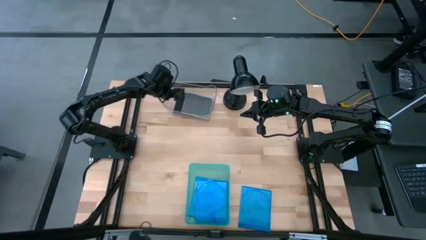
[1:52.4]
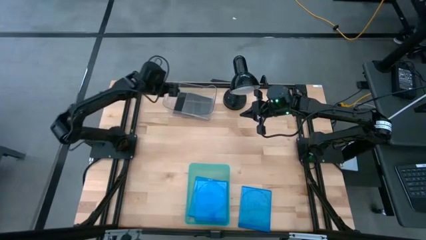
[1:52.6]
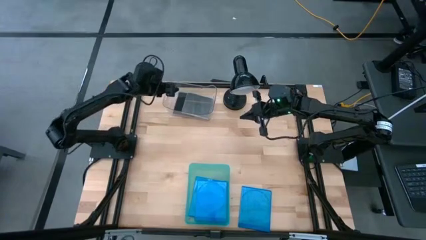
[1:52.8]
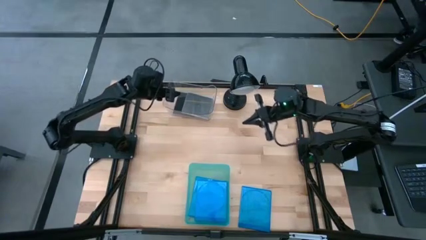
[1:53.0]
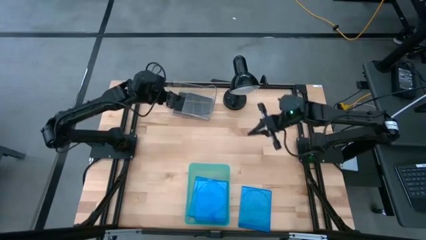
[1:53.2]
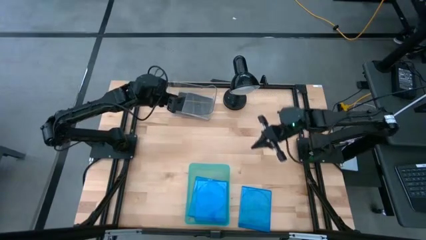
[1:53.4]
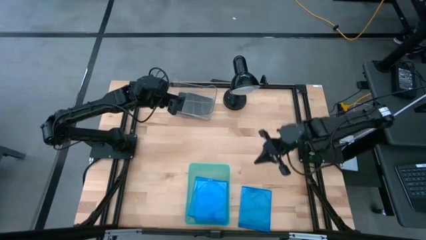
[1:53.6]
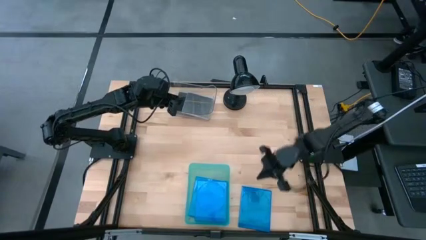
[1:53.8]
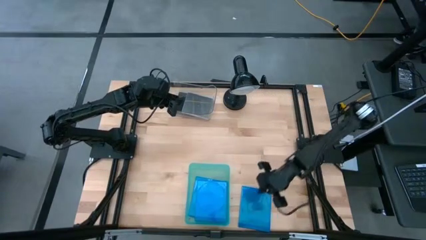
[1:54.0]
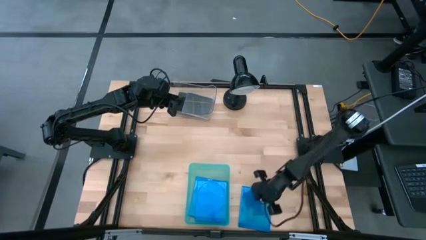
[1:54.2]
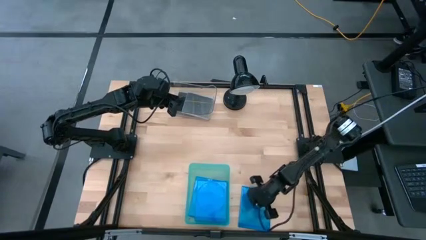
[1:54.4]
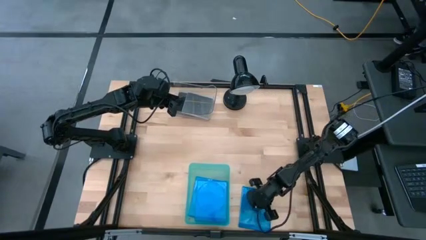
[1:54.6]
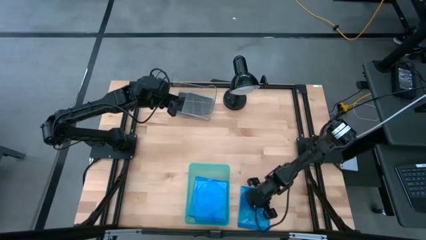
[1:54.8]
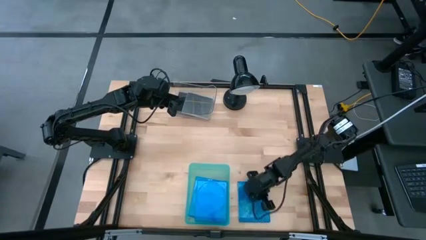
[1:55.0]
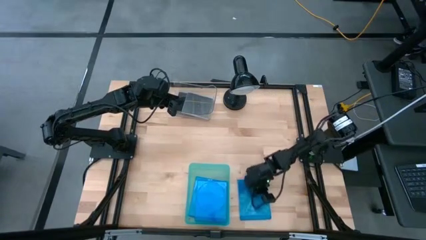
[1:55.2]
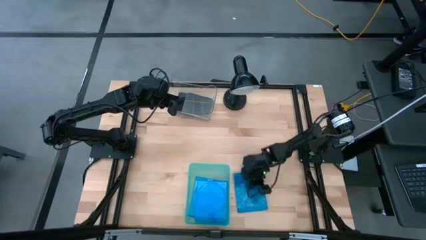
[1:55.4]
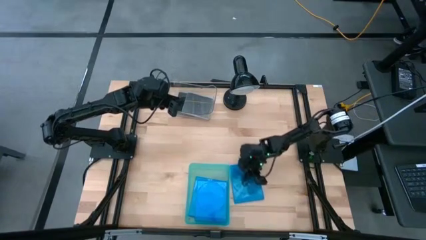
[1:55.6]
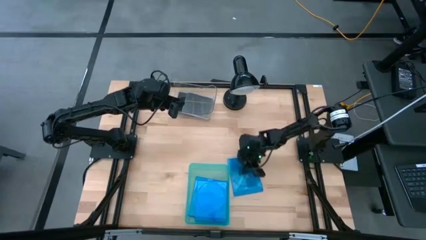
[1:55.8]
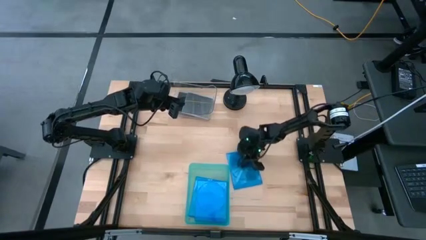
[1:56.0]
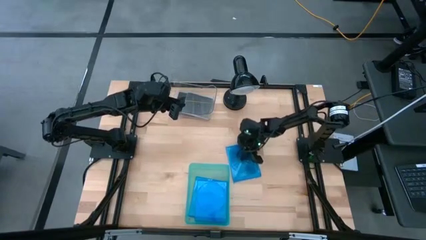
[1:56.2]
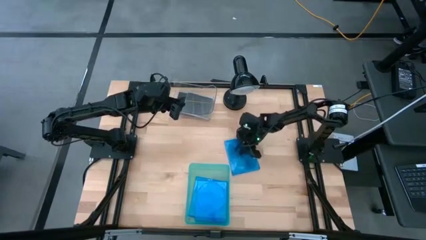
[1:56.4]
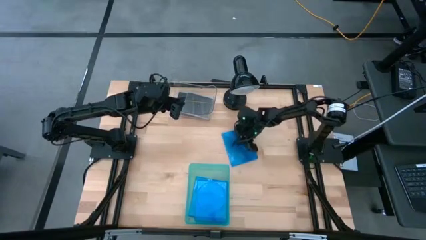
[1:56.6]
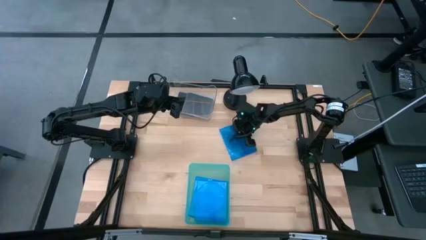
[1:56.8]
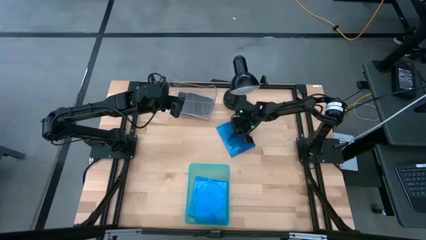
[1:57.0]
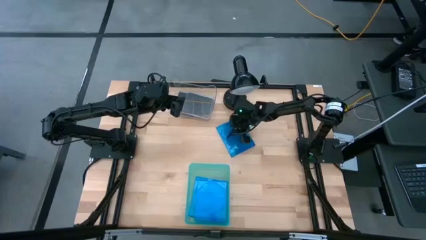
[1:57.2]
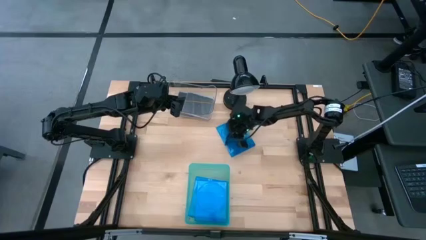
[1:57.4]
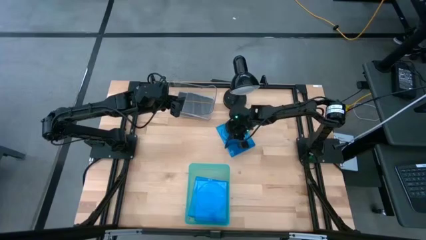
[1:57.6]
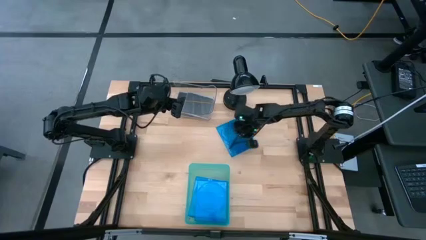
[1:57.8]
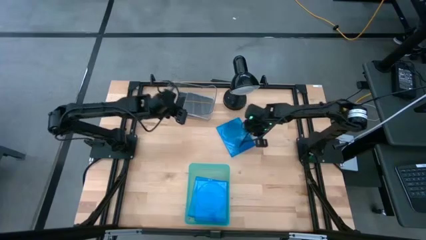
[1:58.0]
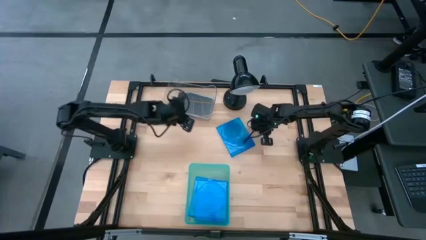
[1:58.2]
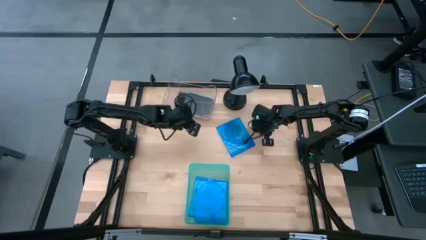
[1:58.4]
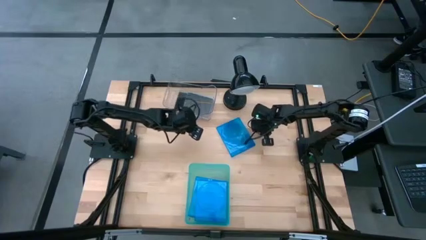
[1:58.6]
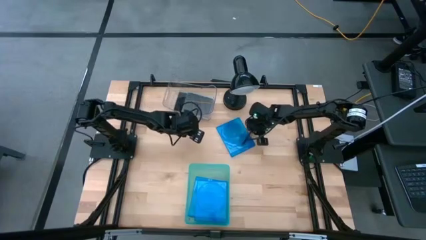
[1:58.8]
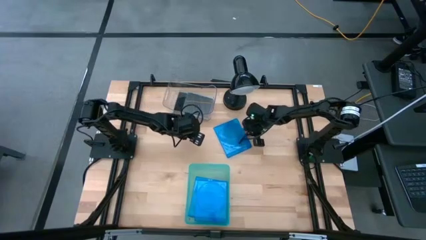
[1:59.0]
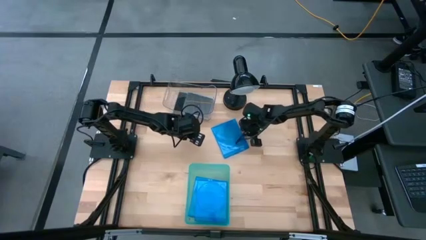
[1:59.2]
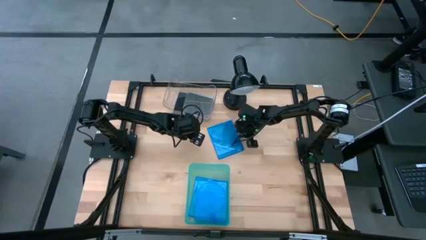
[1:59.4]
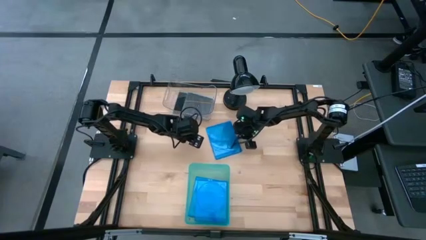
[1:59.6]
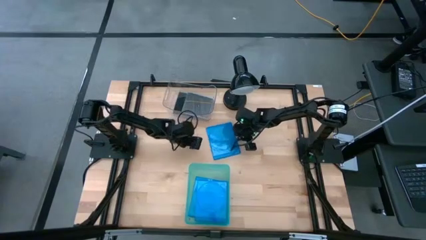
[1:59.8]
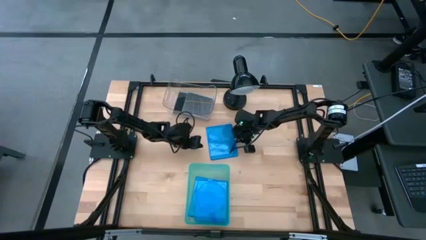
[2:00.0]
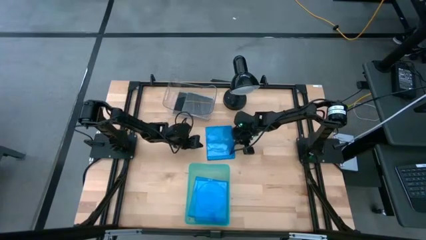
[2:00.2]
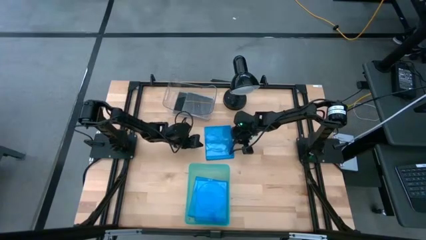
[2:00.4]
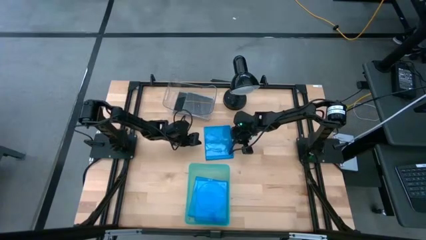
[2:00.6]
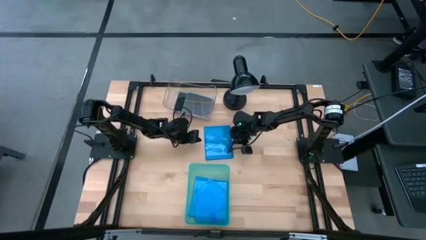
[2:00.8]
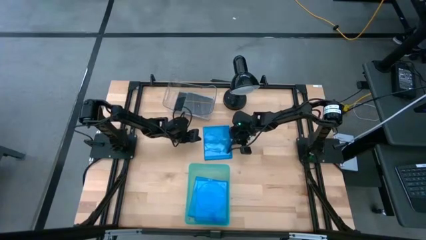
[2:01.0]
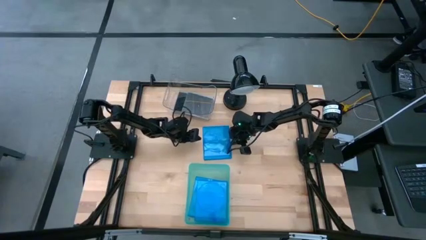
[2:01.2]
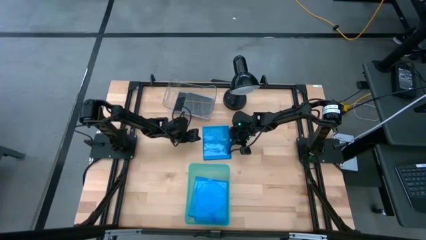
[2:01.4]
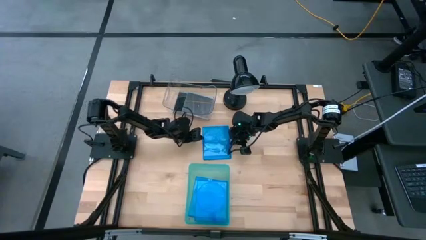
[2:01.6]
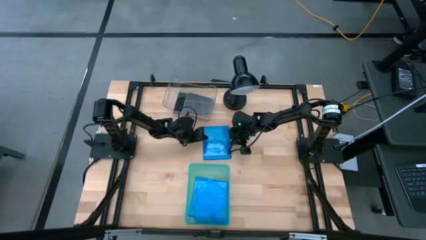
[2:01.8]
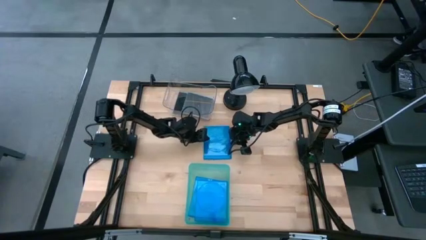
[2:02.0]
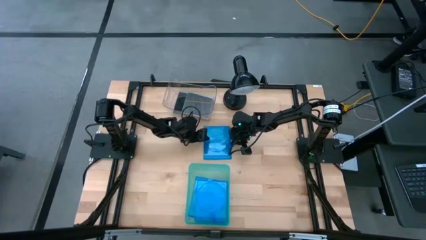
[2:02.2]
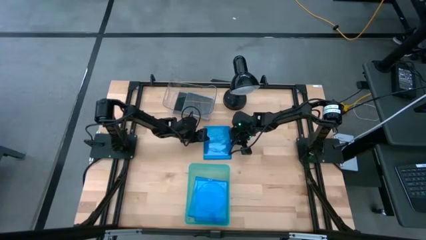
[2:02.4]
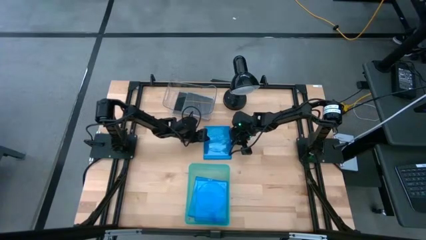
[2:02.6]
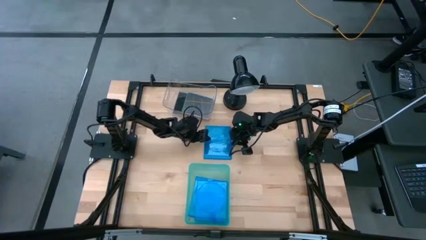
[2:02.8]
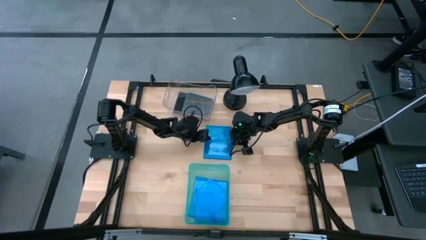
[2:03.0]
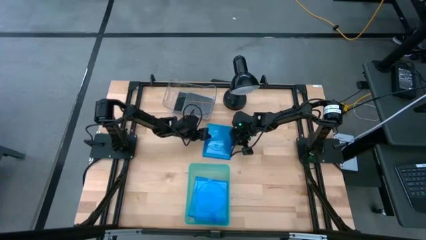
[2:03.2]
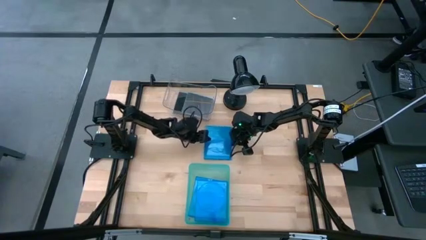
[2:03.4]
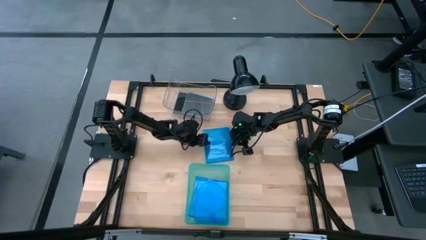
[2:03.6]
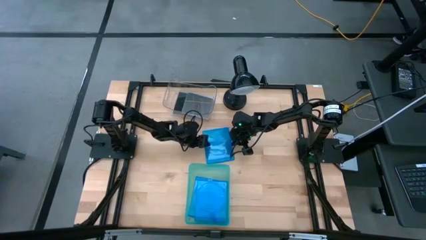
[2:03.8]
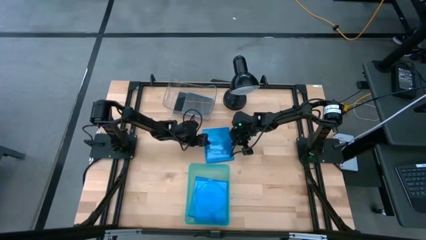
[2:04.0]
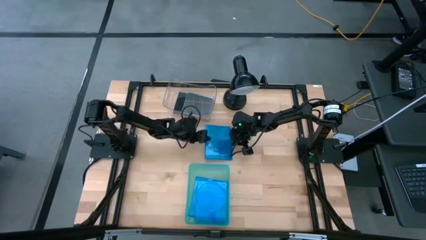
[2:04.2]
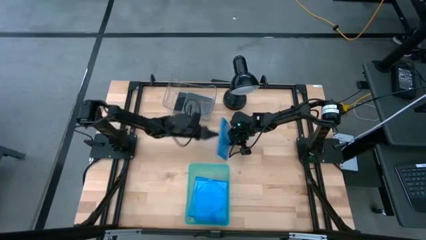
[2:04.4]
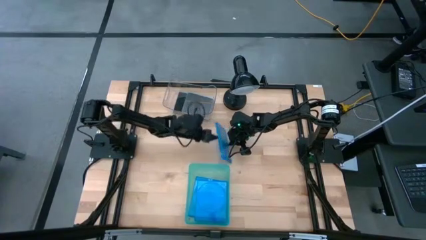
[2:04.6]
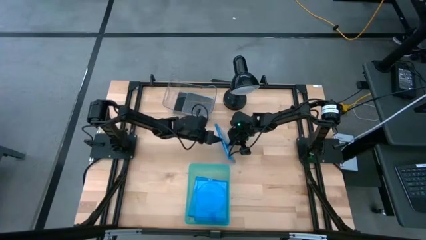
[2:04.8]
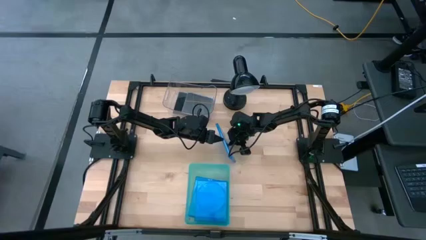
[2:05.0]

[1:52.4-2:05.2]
Task: Pick & place jewel cases by type
Put the blue CD case into the green bin
